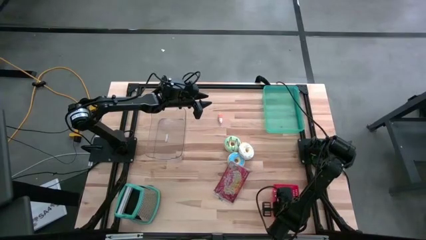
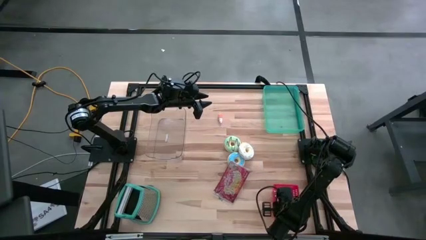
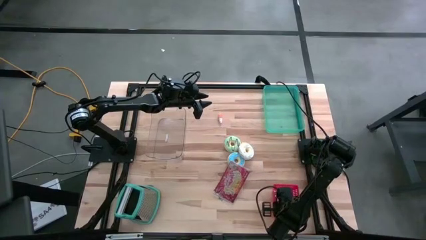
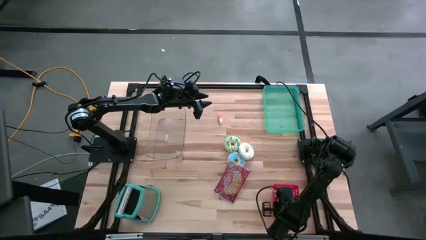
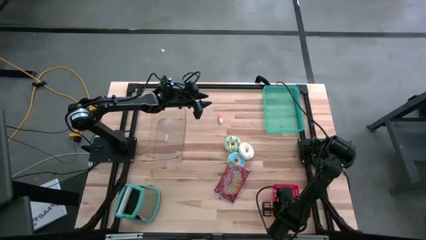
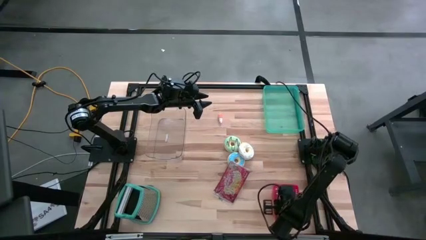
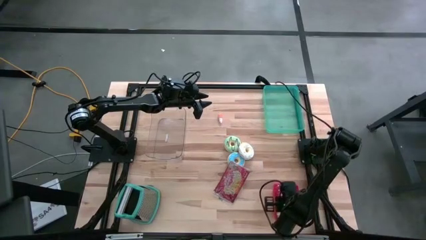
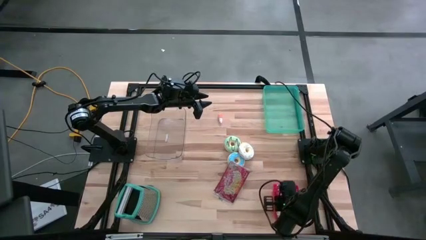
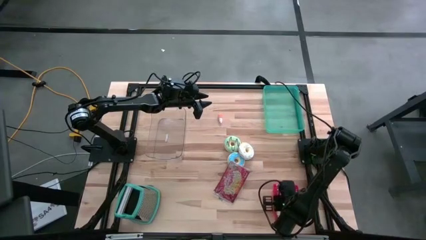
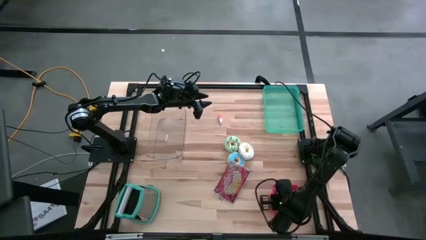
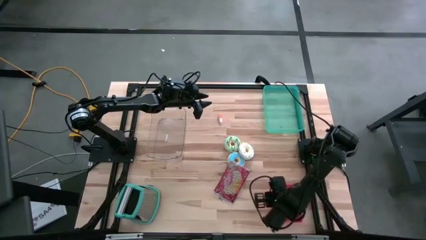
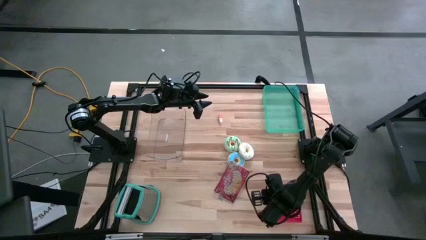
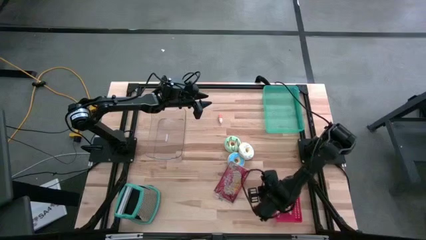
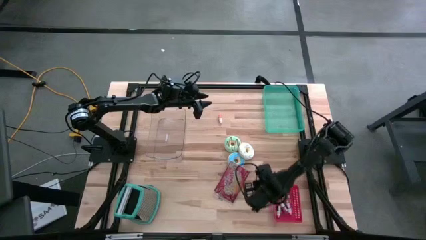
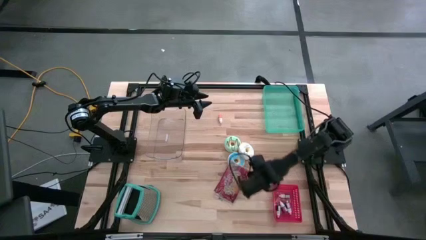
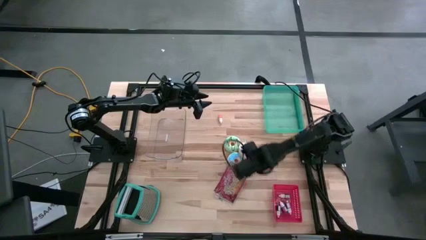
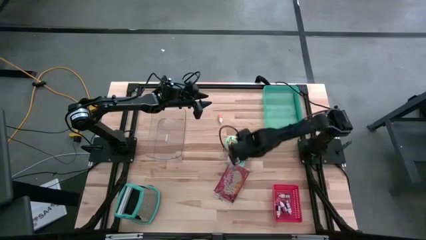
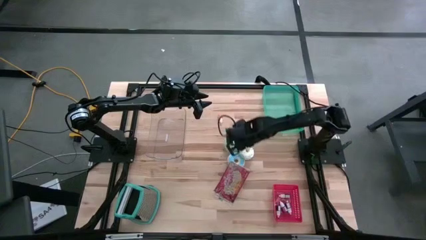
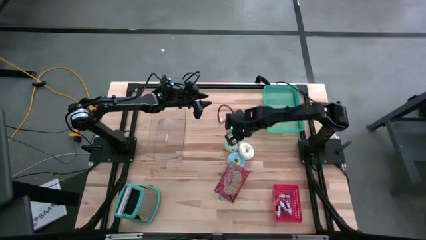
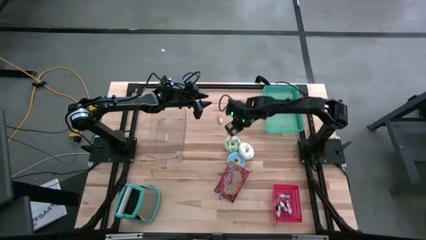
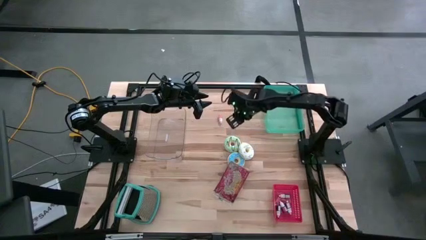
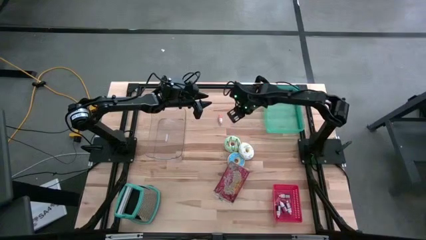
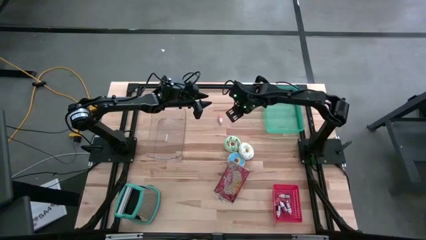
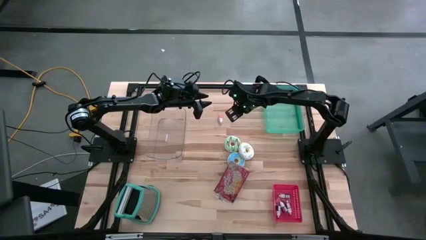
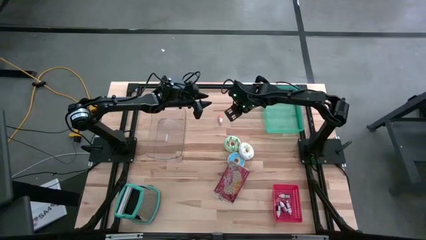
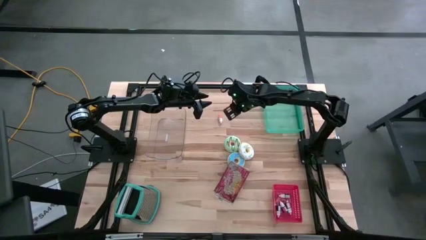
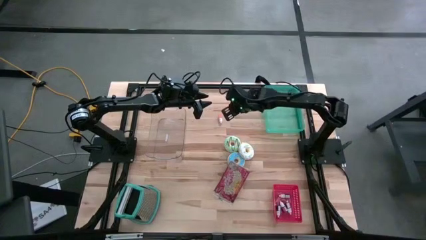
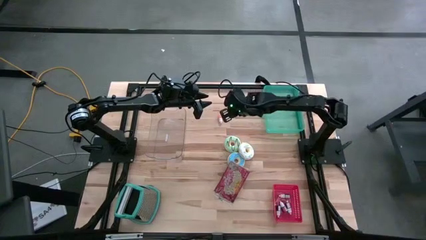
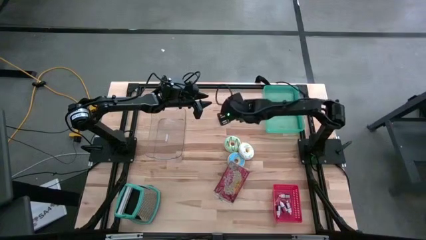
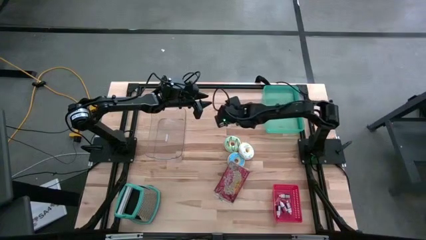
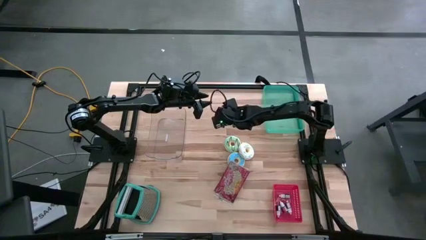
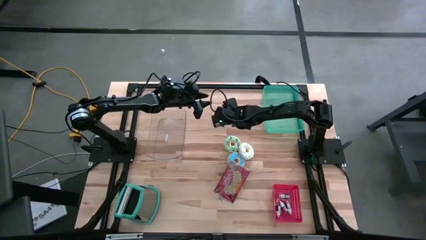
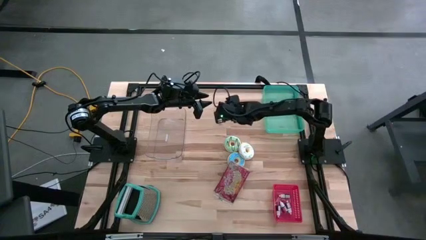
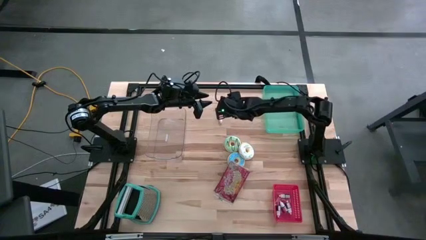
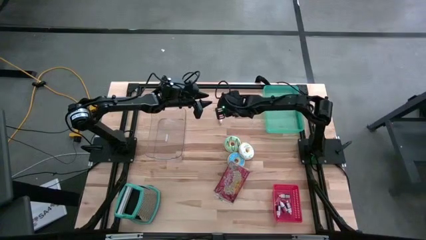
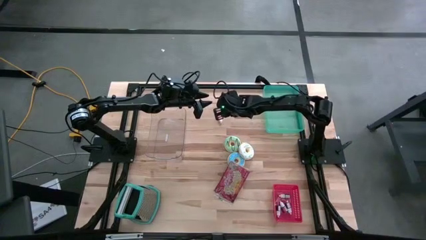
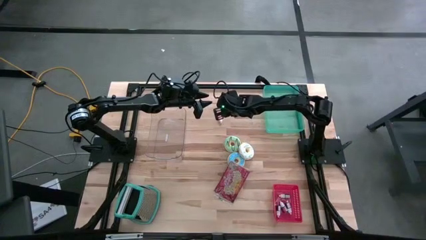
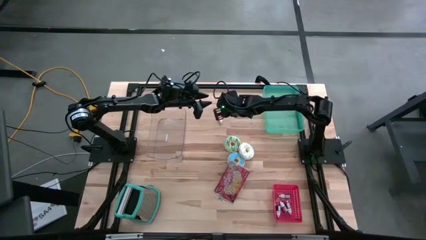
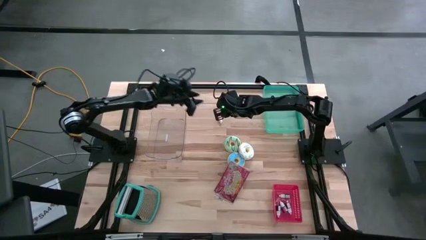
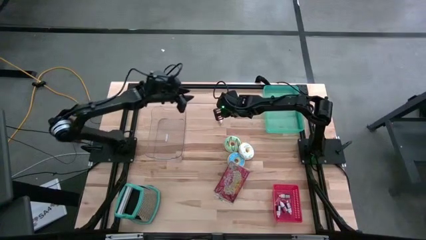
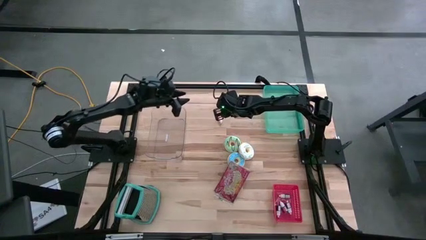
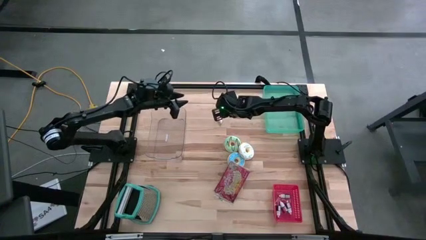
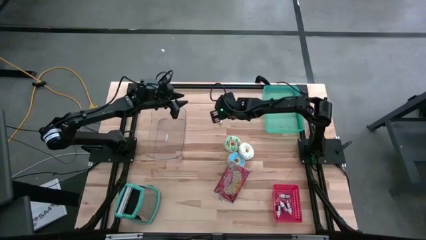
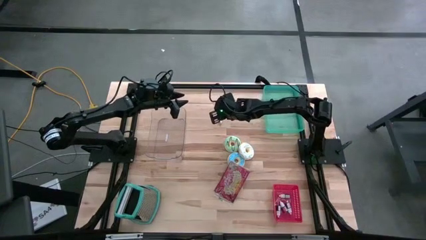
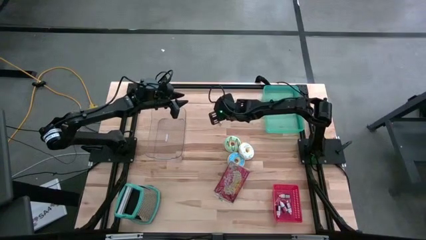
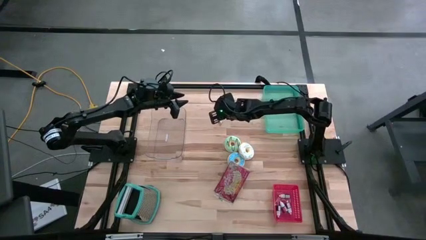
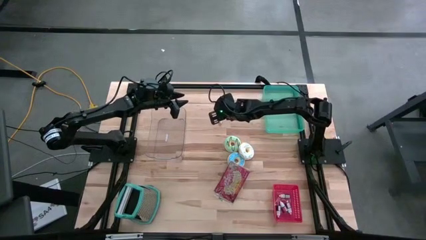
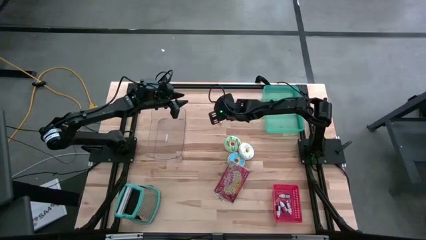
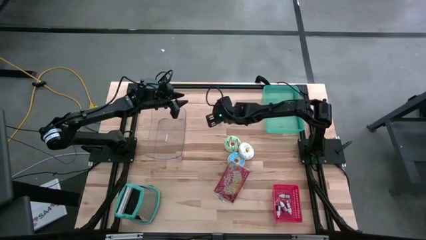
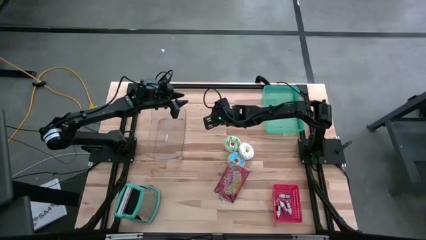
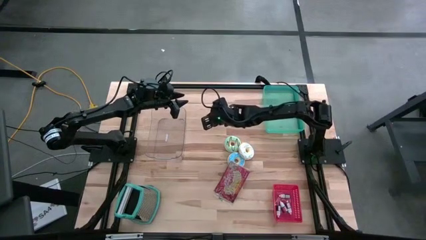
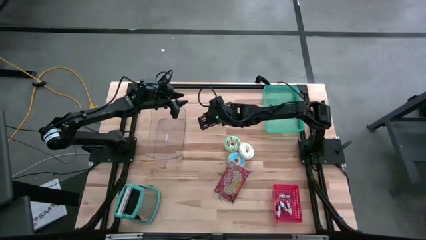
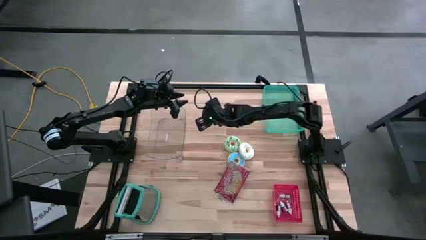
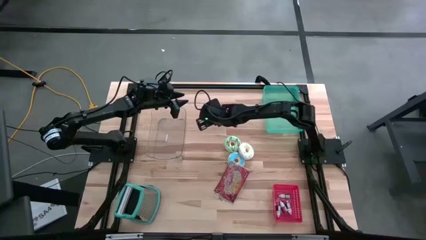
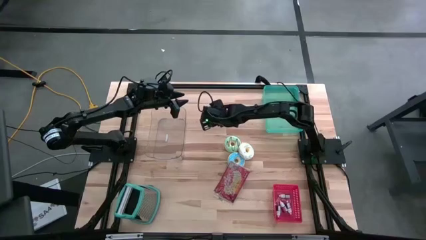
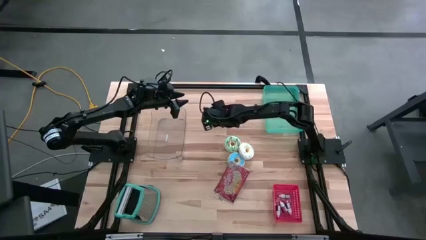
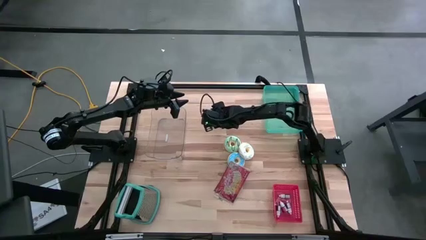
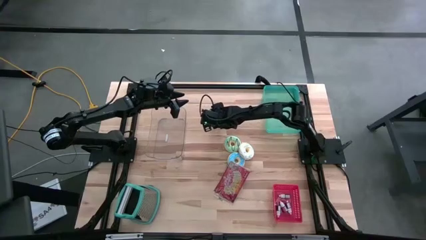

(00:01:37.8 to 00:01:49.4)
Put the orange food coloring into the red bin
